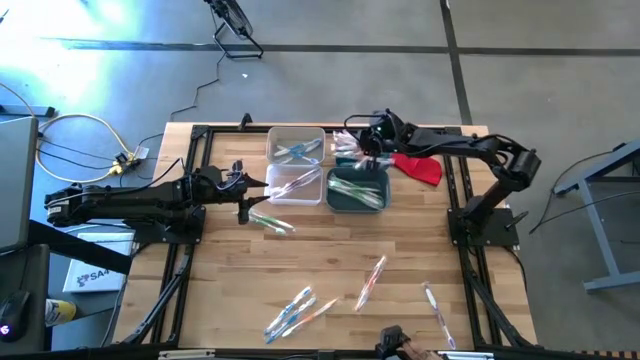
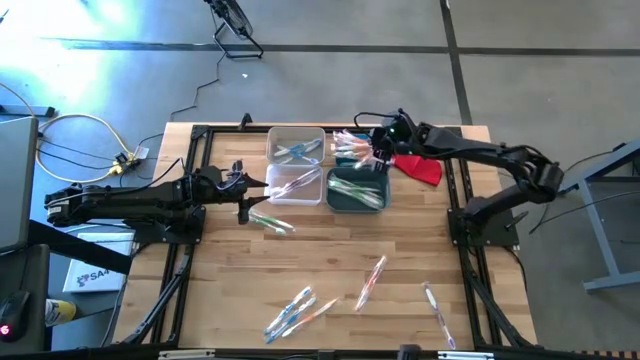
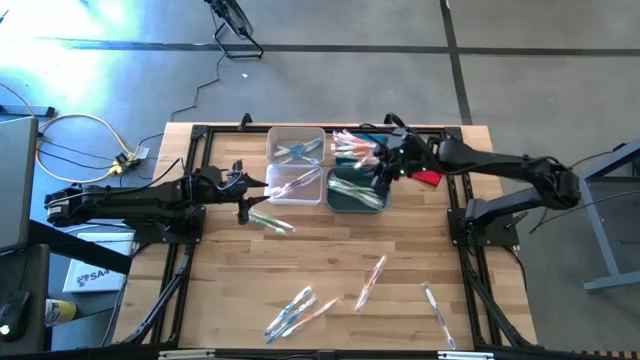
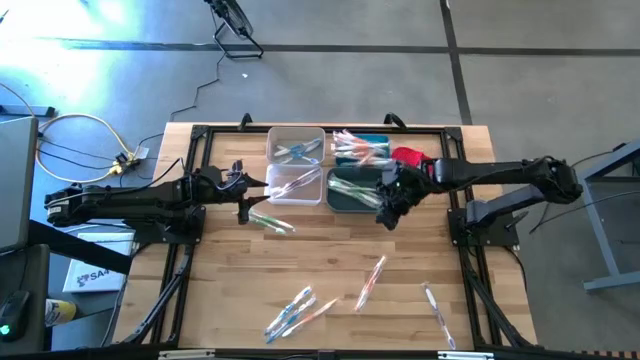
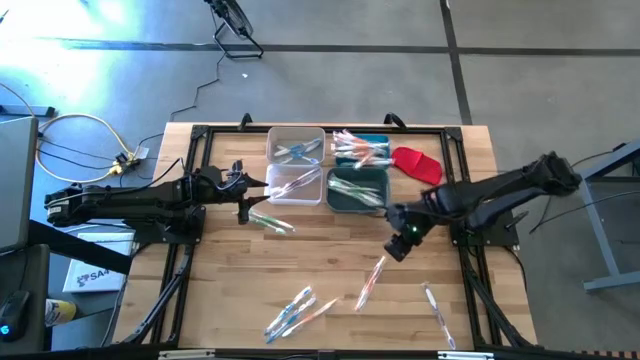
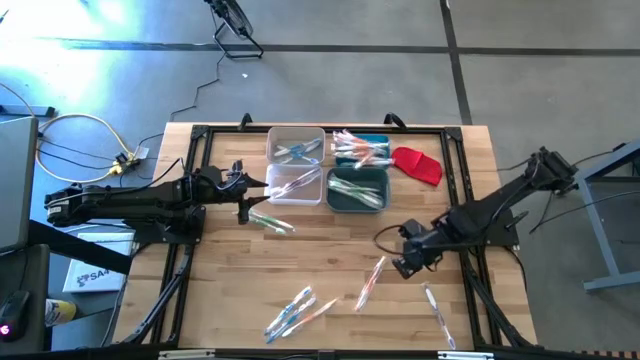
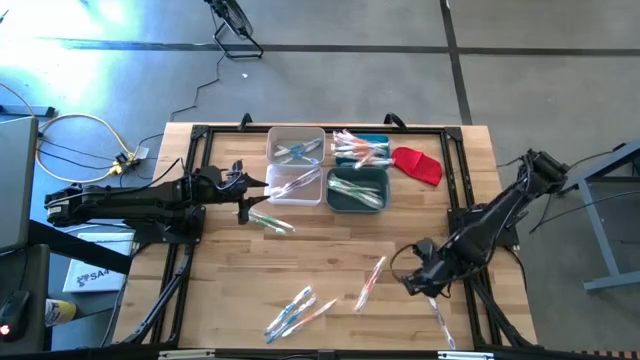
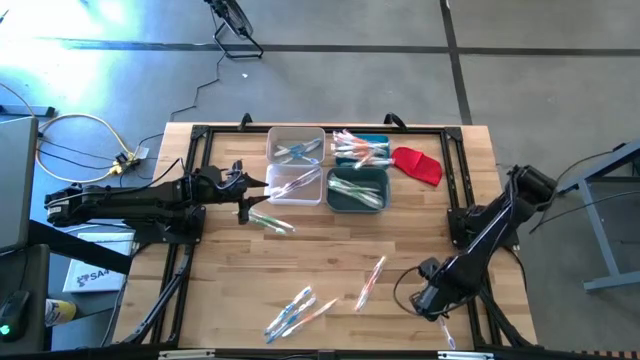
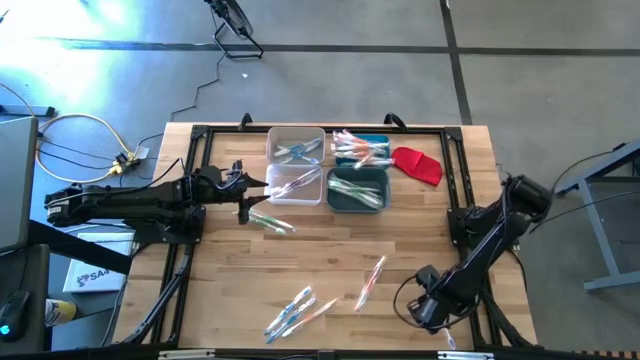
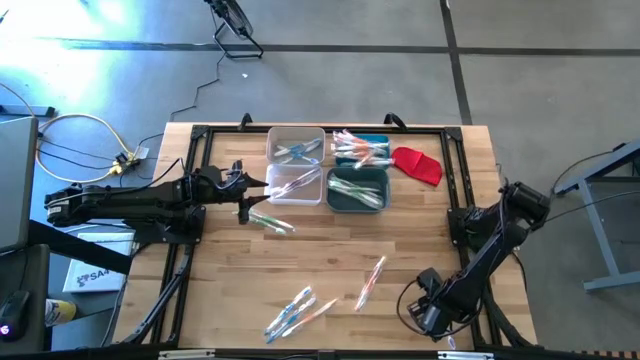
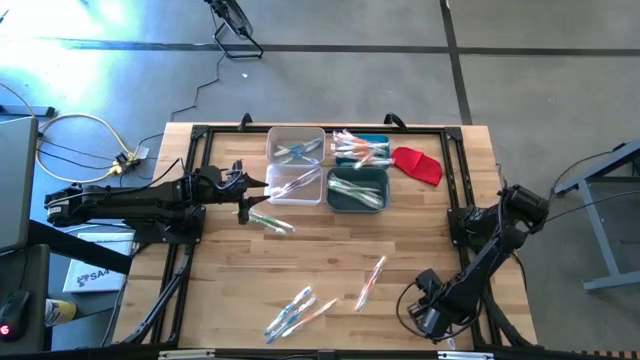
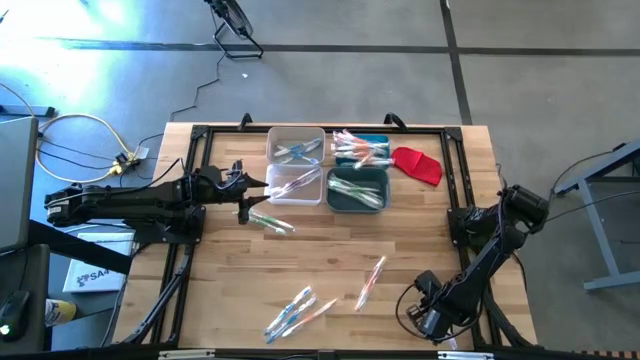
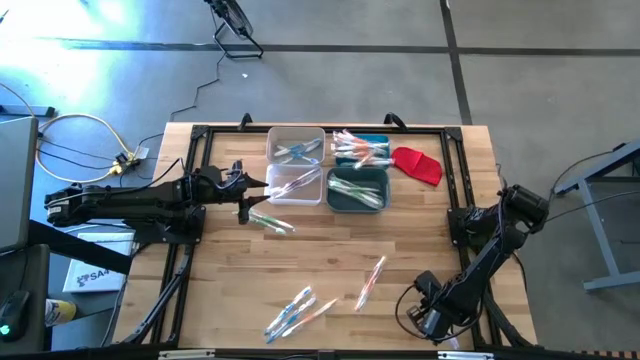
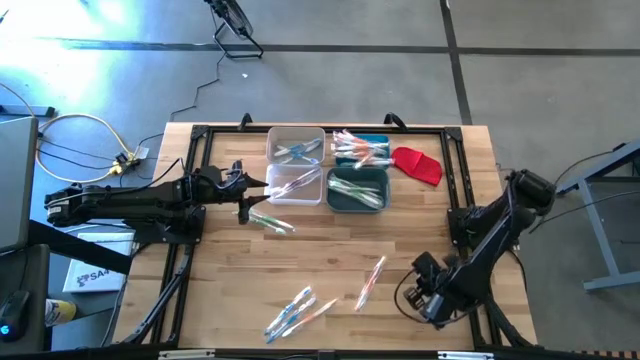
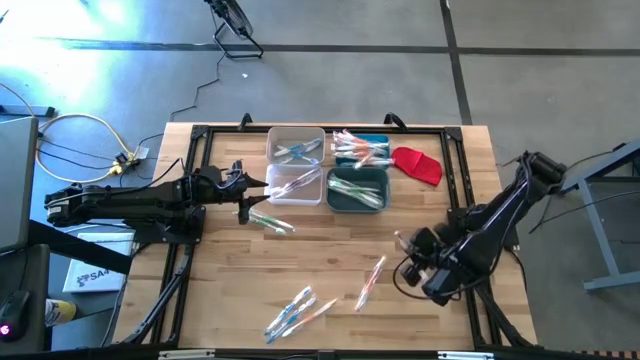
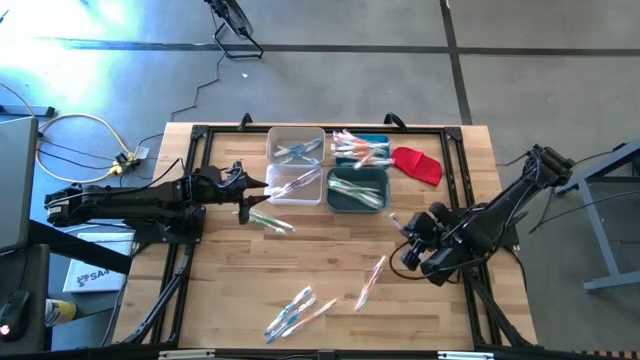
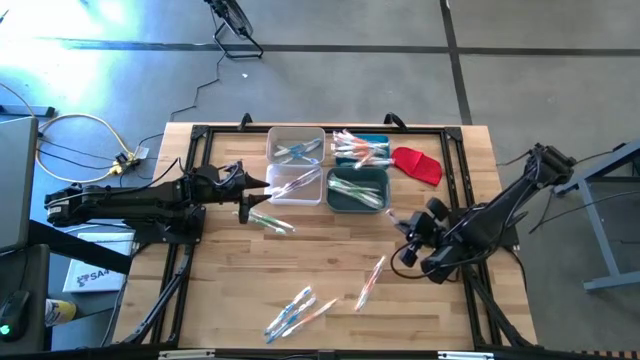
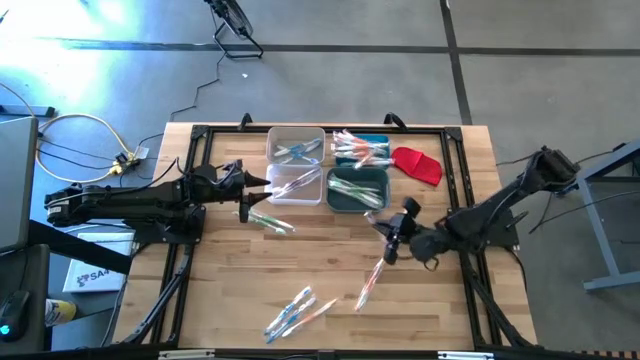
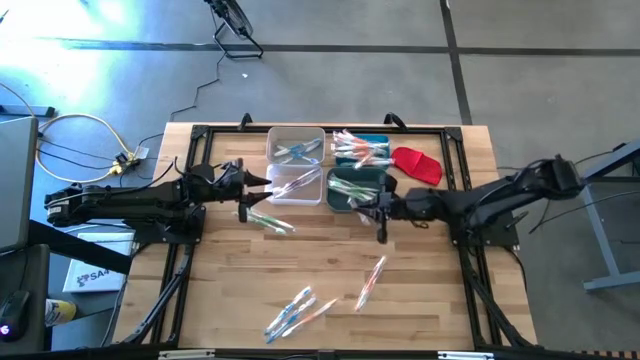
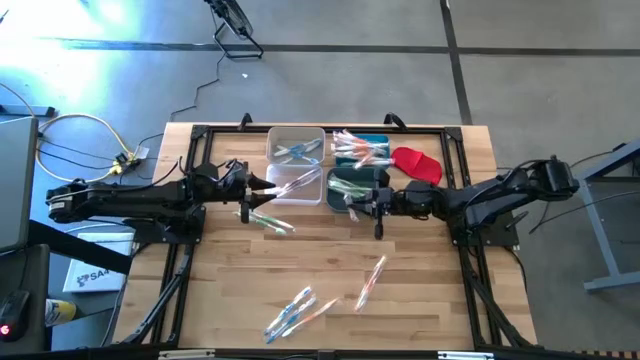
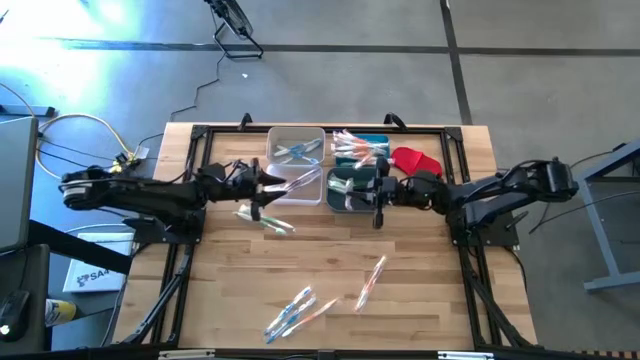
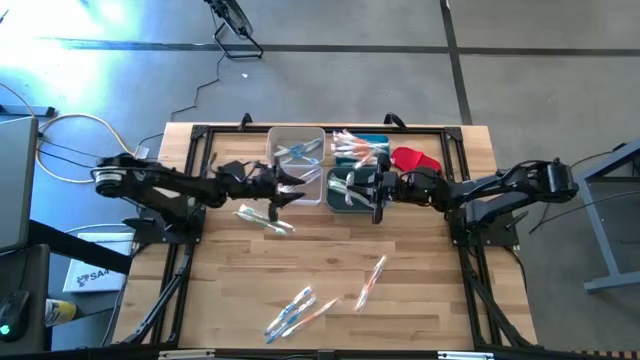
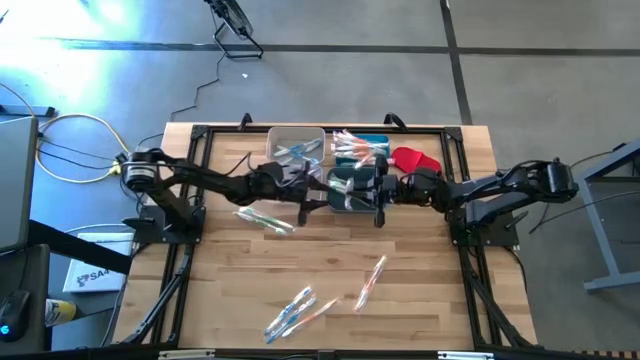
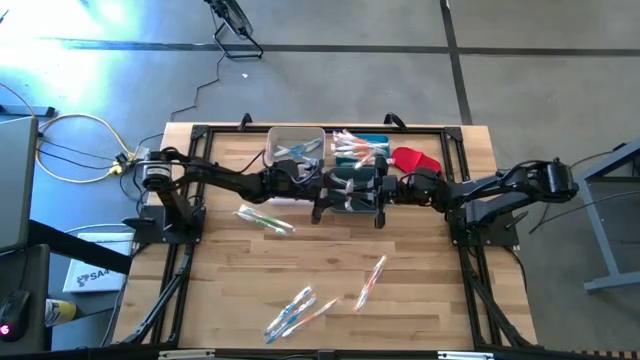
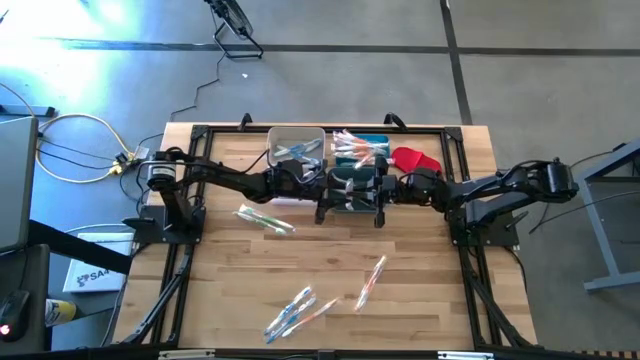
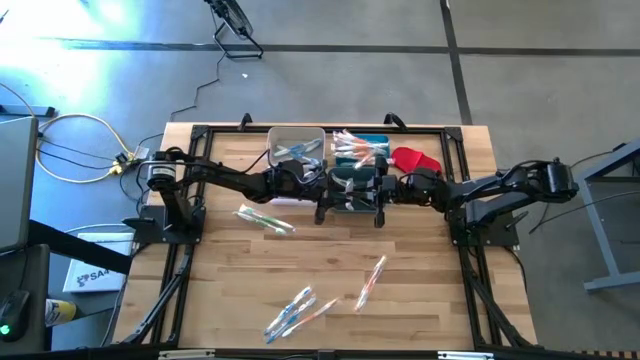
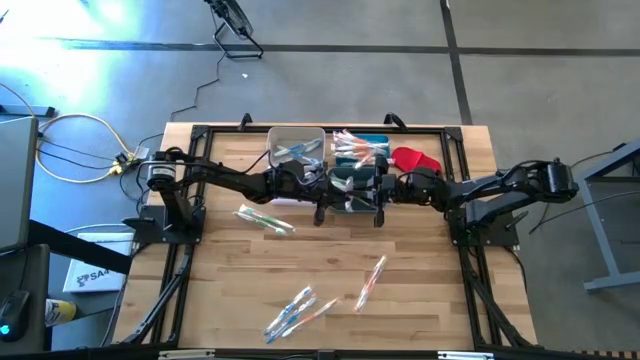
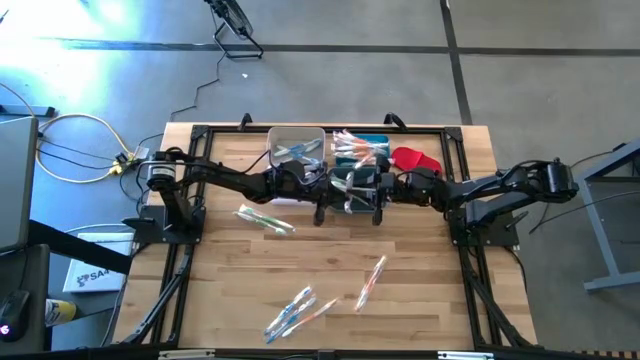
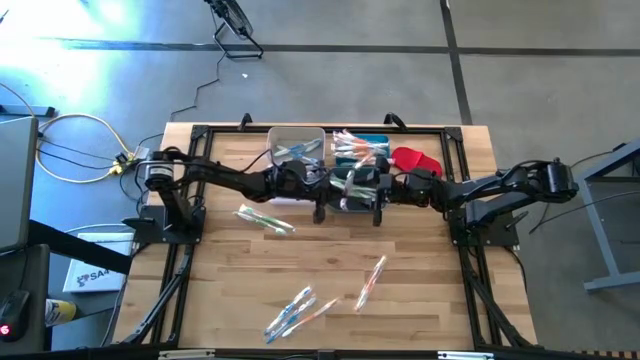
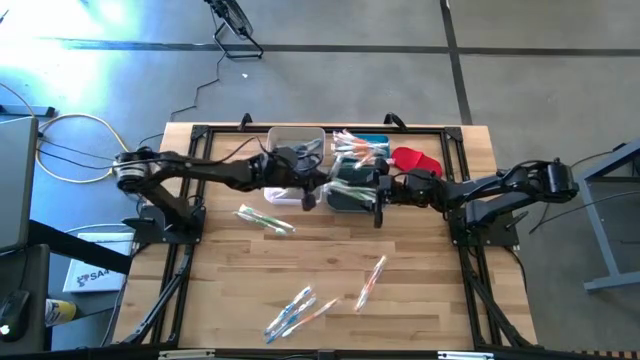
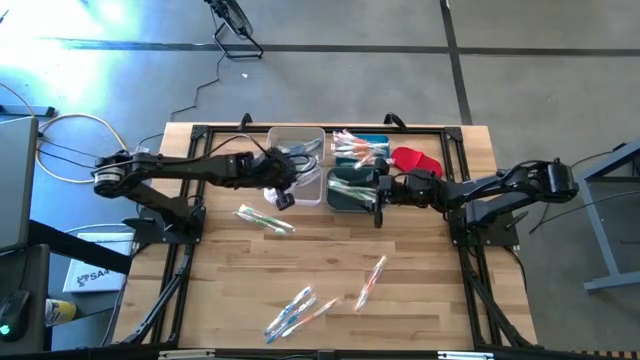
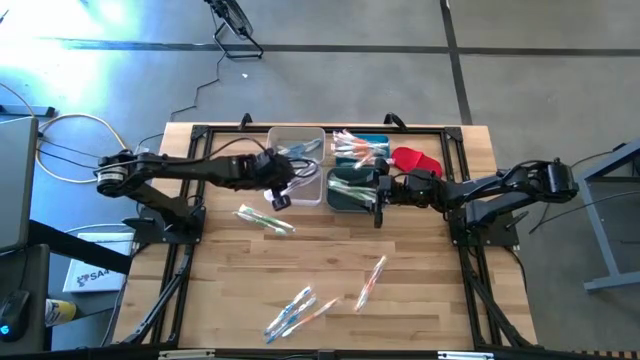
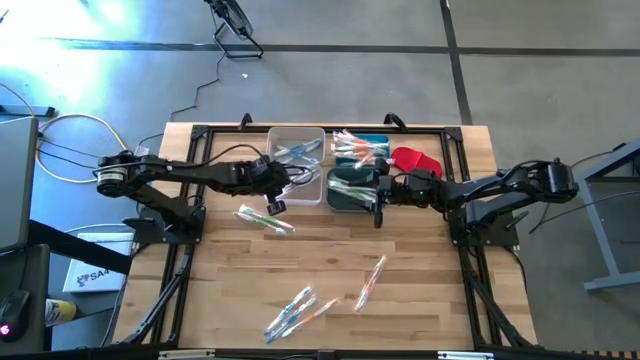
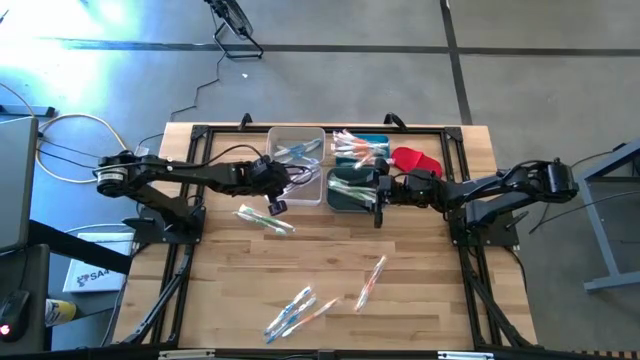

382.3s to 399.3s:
Task: Pick & Place Toothbrushes
Put the purple toothbrush into the transparent bin

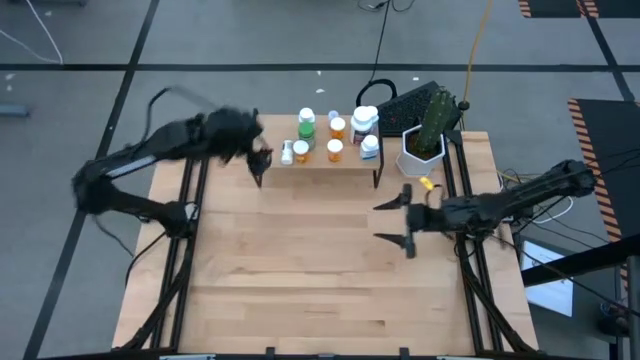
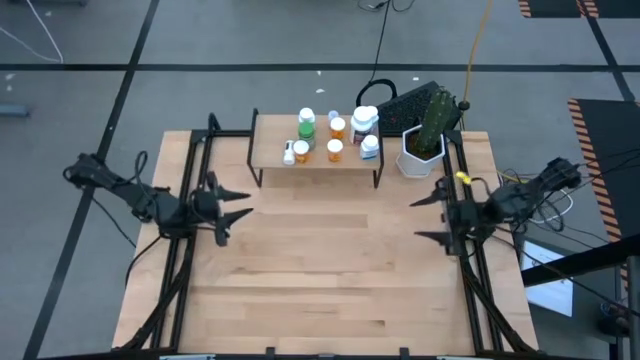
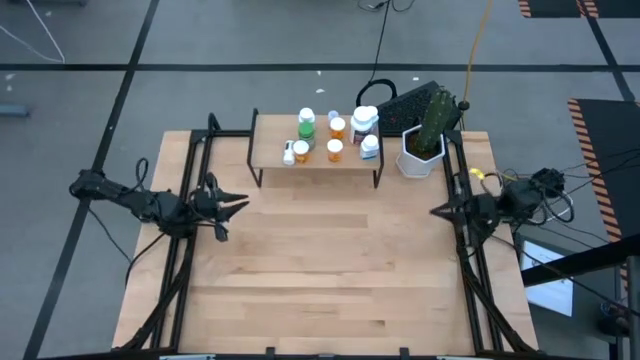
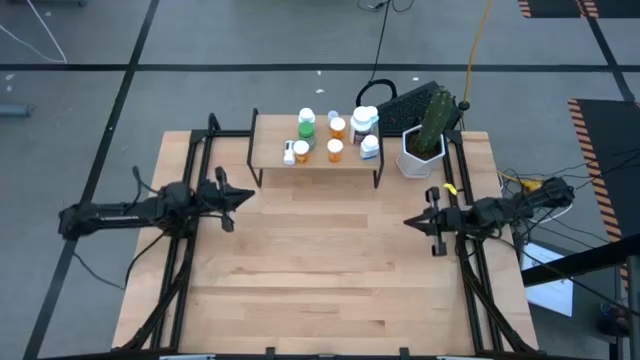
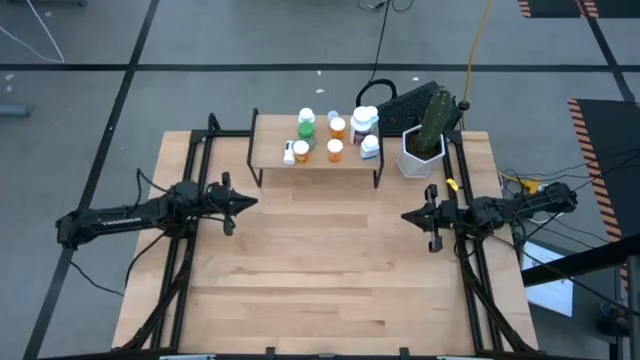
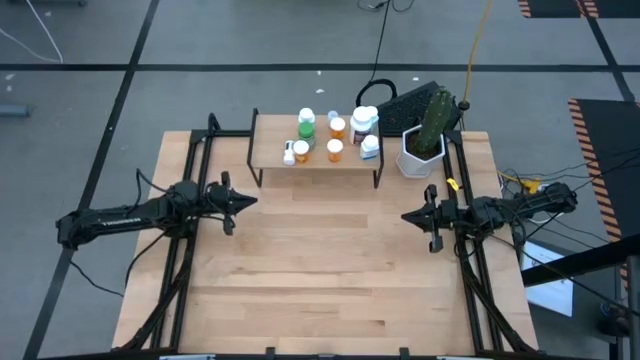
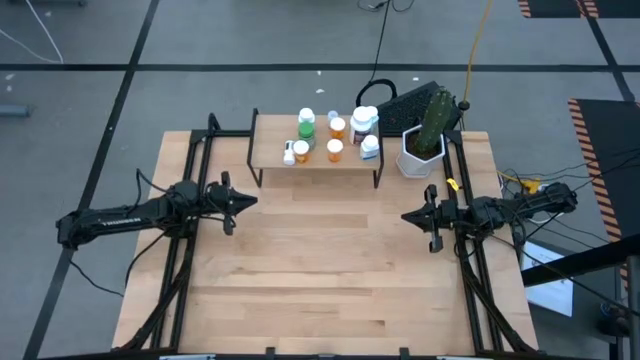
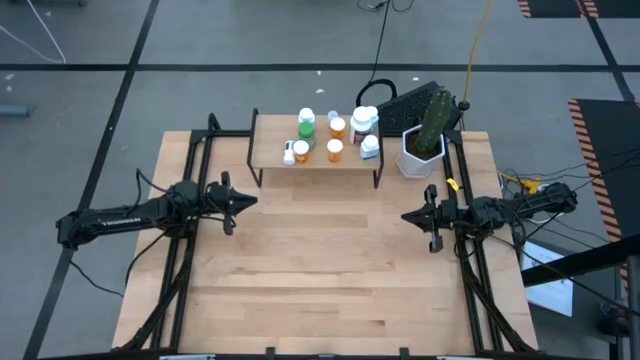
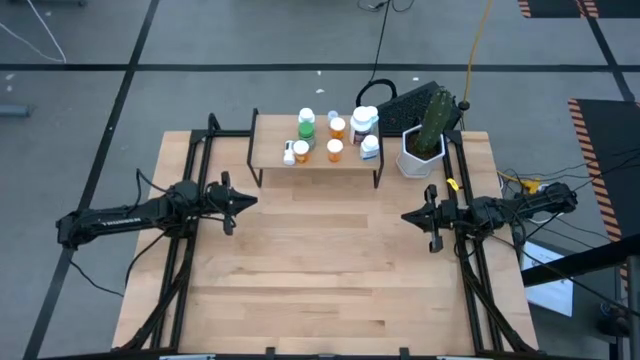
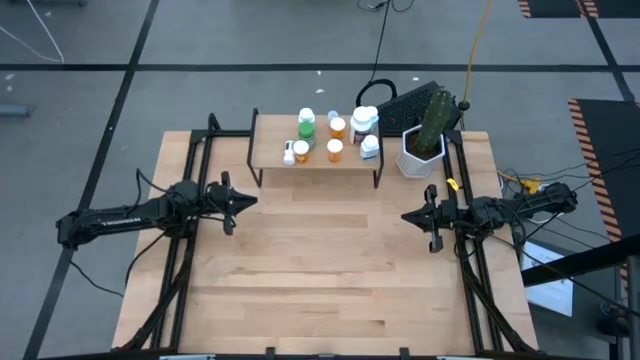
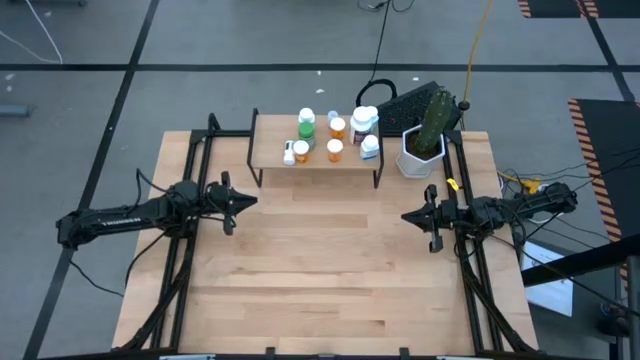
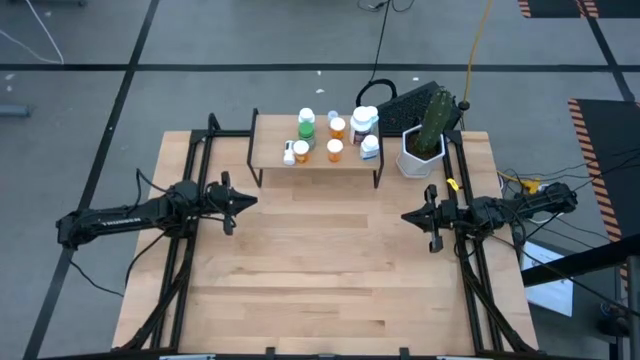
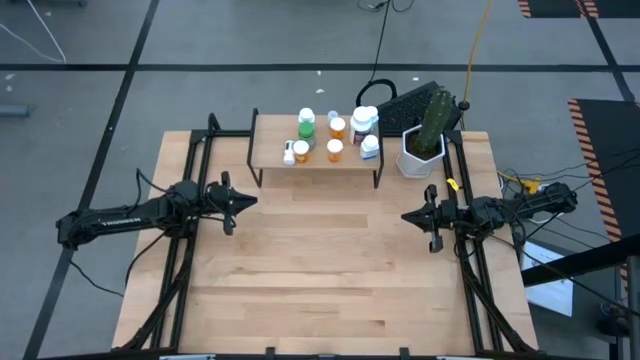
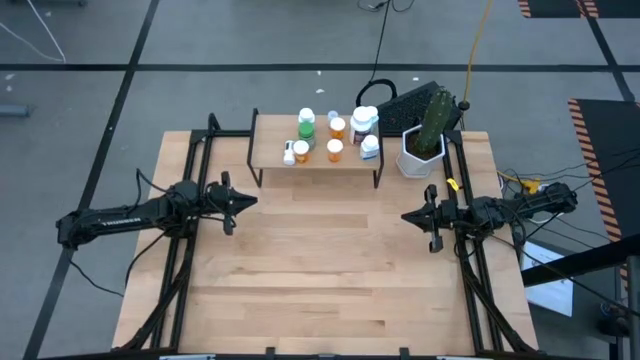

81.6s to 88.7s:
Task: Pick and place medicine bottles onto shelf by color
Return to Home Position
